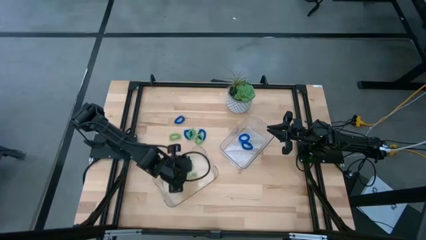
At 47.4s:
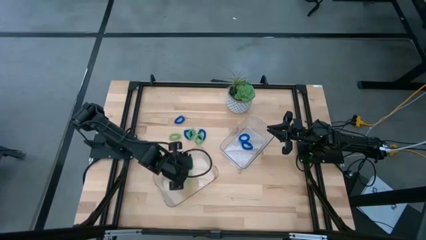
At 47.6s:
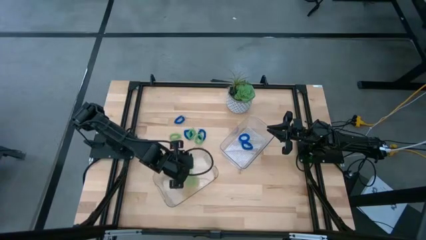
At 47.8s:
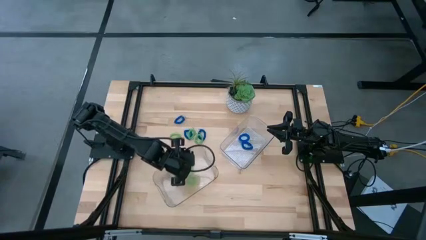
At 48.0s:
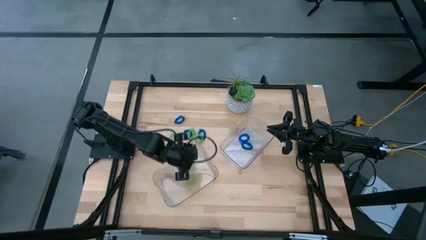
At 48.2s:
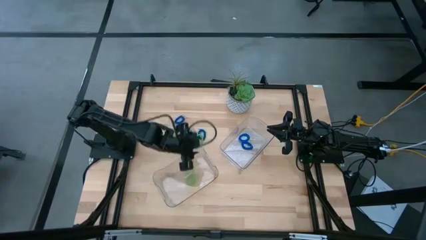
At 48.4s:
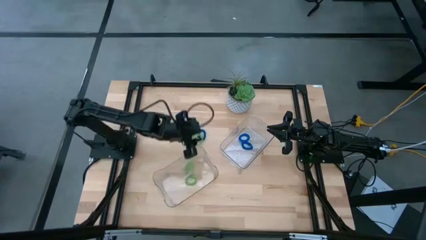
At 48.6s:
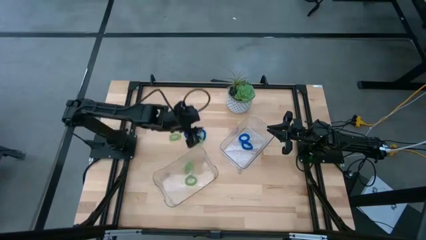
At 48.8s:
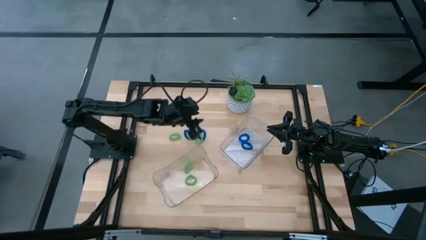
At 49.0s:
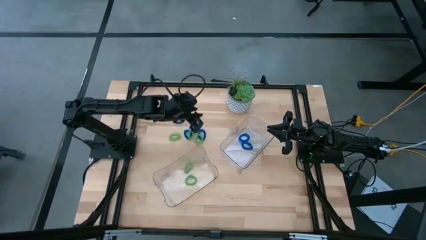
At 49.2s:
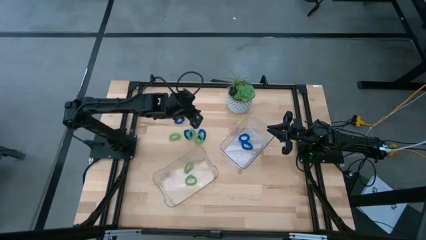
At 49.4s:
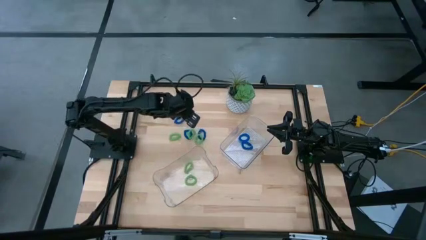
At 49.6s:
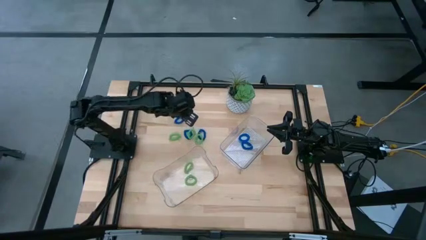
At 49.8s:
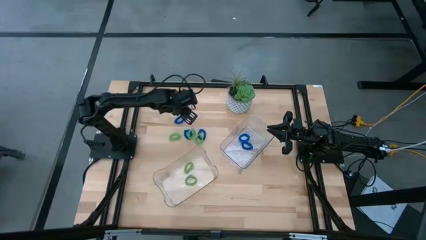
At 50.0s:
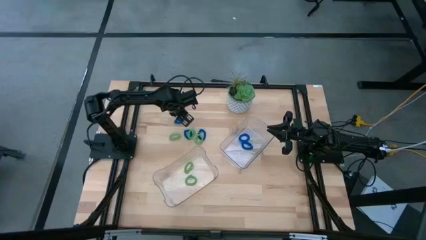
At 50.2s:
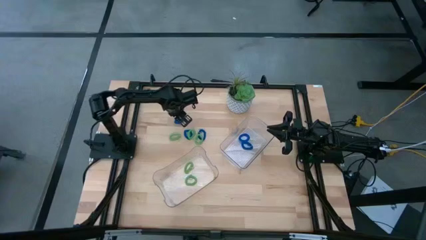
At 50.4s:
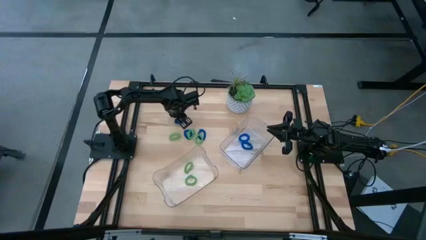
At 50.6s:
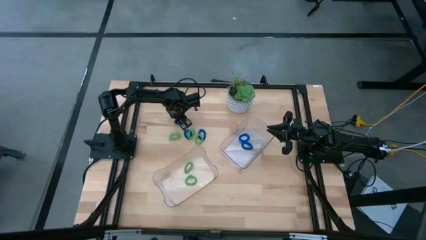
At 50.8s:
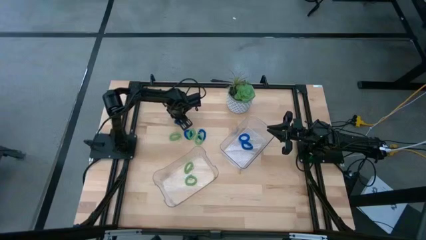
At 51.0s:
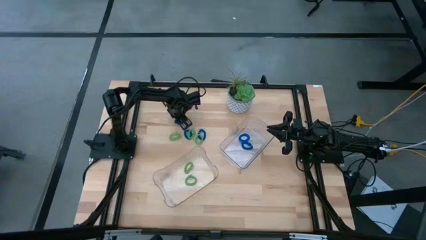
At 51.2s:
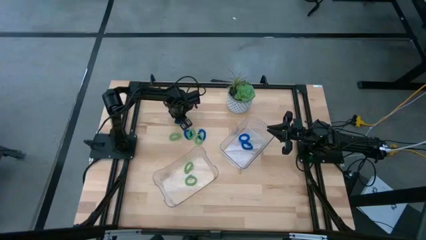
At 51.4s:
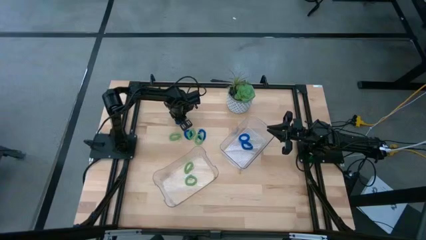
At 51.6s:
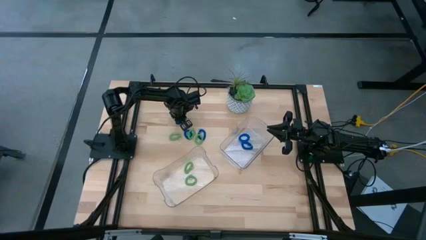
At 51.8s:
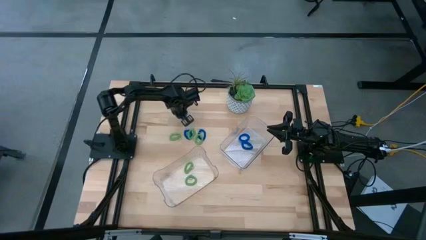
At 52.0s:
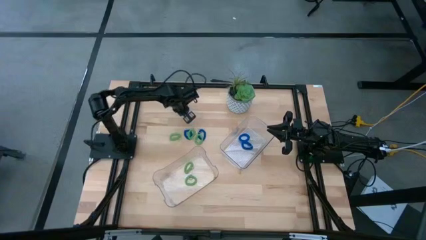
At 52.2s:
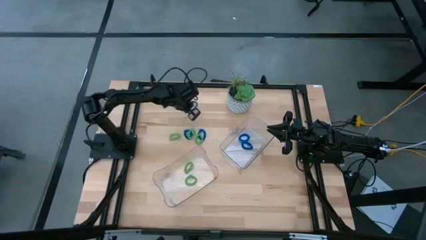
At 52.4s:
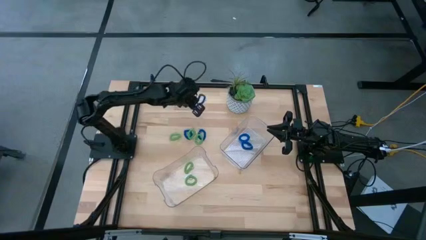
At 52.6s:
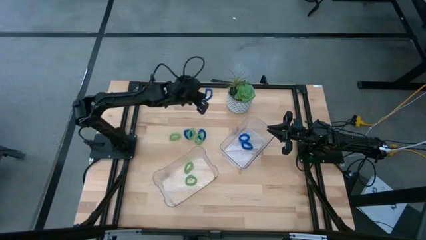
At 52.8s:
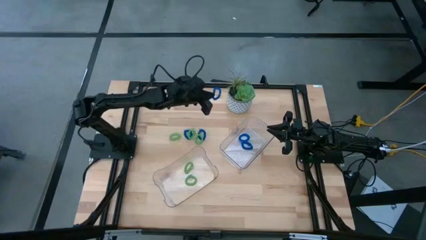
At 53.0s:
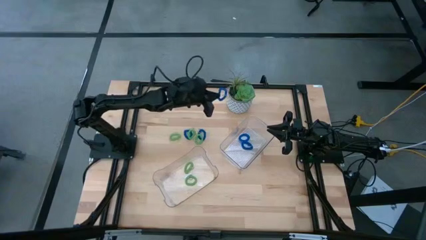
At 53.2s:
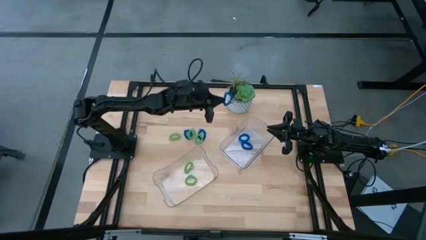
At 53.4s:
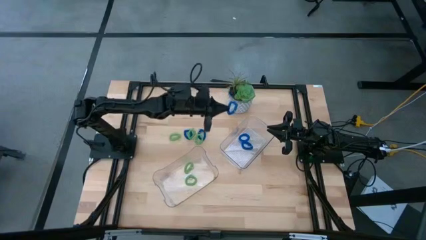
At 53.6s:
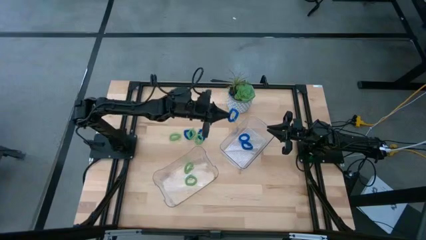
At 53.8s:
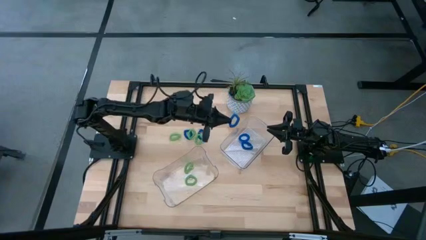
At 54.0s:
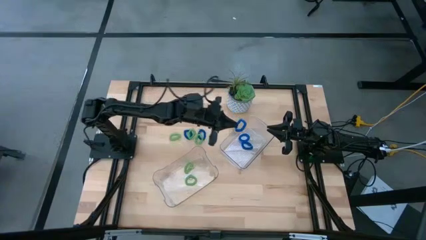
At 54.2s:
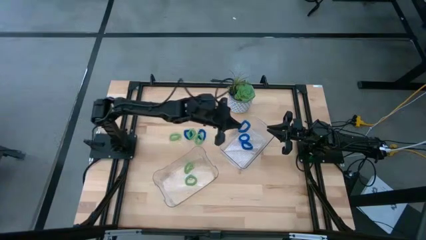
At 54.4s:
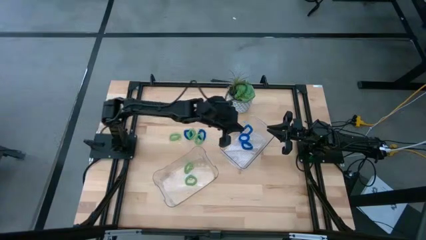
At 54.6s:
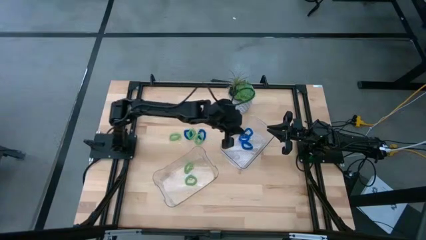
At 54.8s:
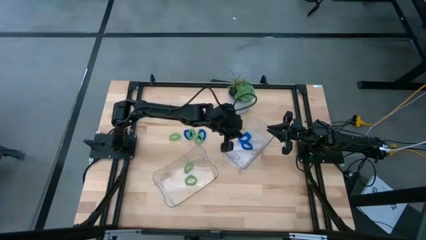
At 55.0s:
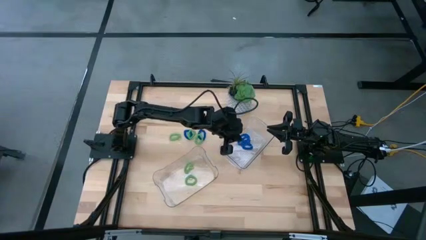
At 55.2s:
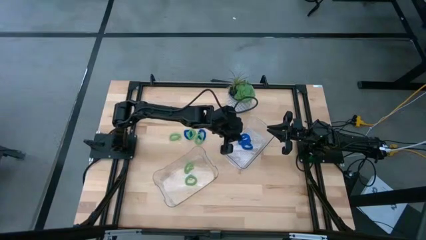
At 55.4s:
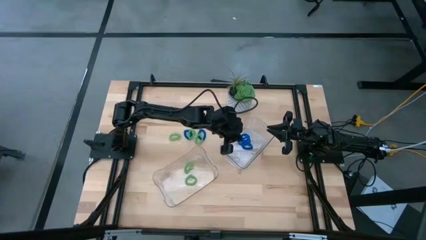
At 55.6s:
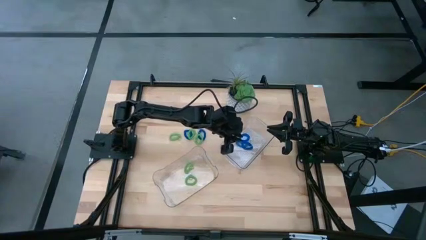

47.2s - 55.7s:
Task: Sort spring keychains
Put the blue spring keychain into the top transparent bin

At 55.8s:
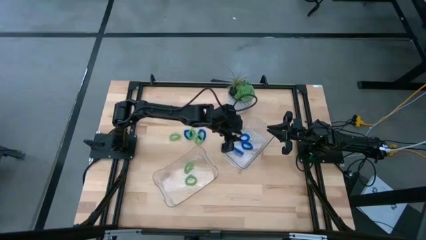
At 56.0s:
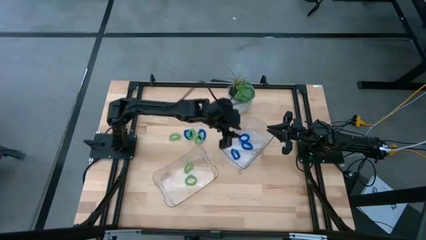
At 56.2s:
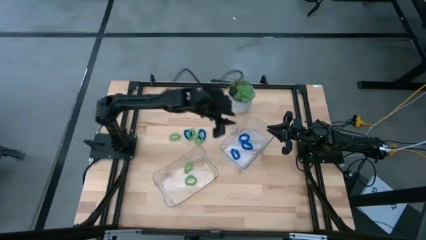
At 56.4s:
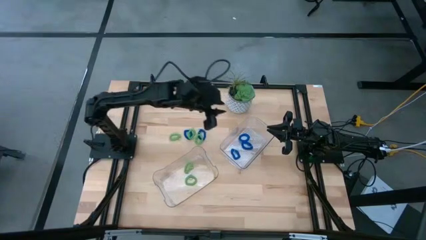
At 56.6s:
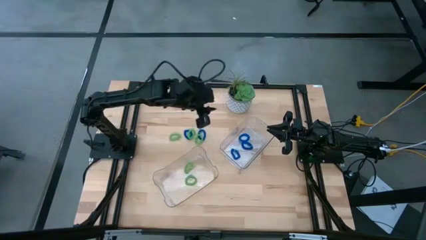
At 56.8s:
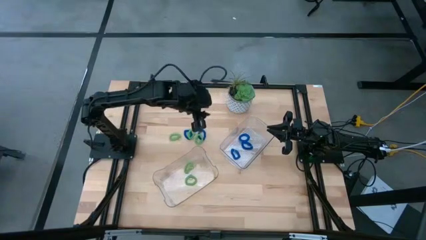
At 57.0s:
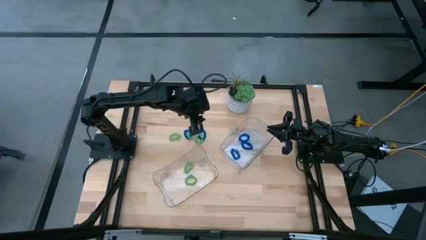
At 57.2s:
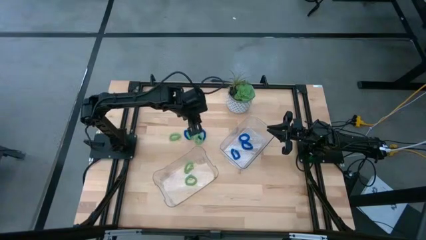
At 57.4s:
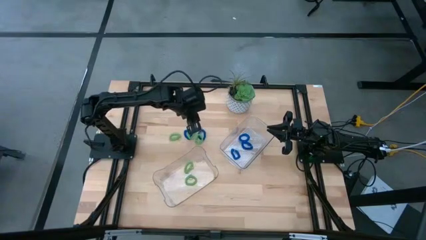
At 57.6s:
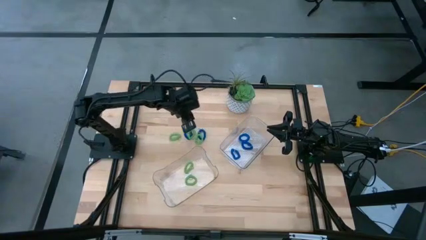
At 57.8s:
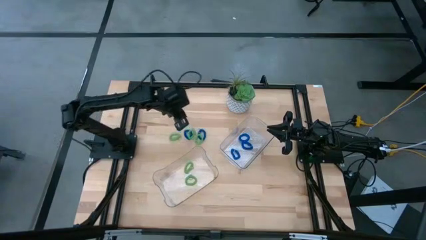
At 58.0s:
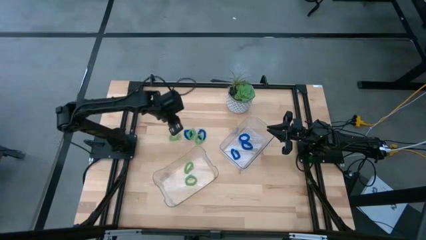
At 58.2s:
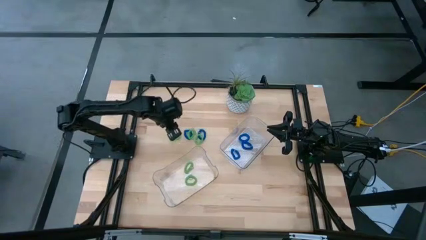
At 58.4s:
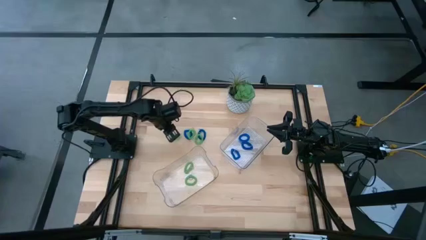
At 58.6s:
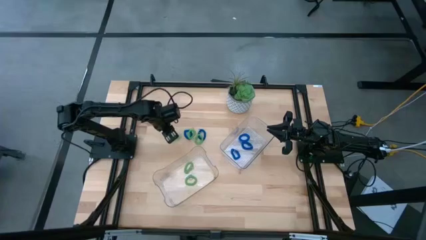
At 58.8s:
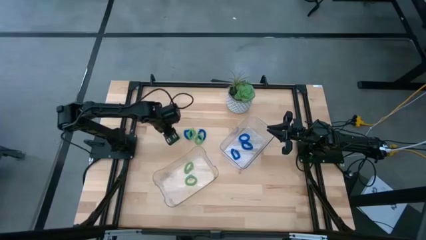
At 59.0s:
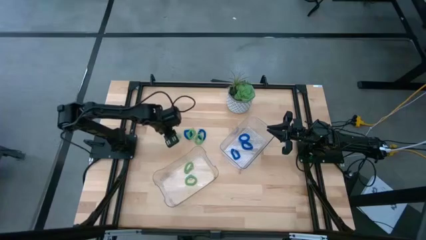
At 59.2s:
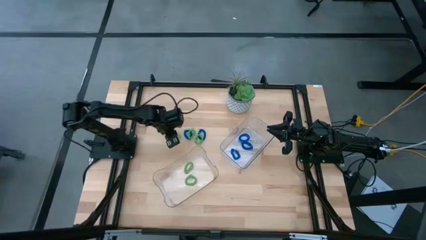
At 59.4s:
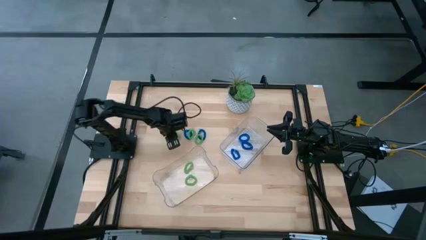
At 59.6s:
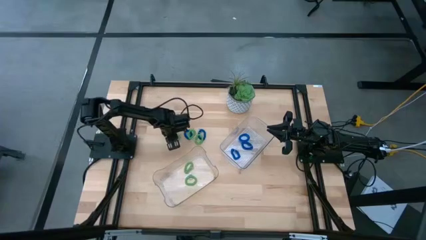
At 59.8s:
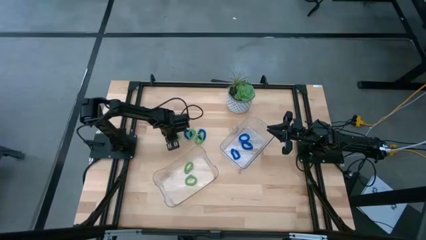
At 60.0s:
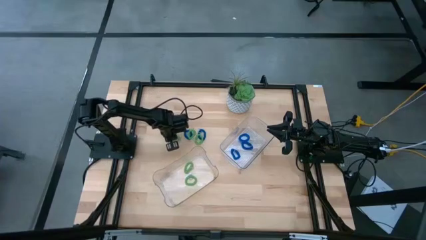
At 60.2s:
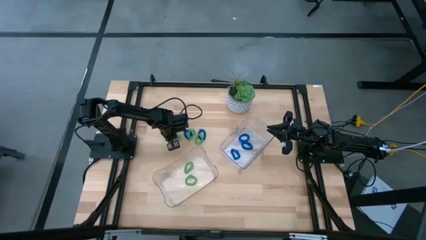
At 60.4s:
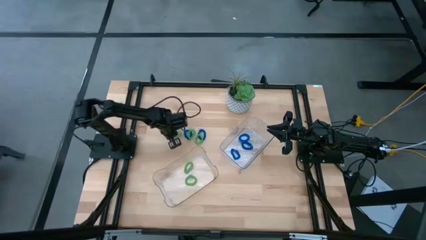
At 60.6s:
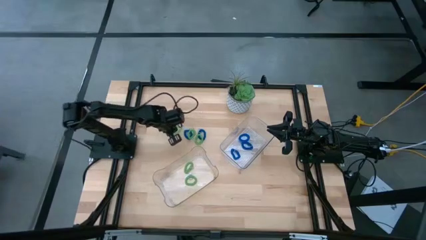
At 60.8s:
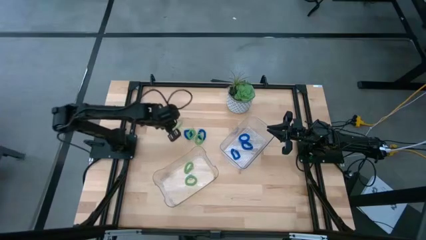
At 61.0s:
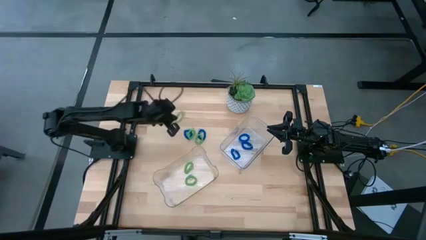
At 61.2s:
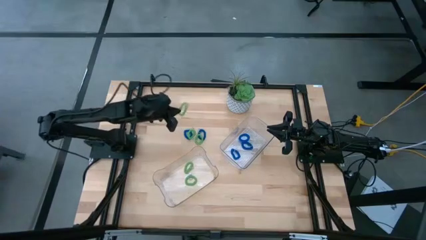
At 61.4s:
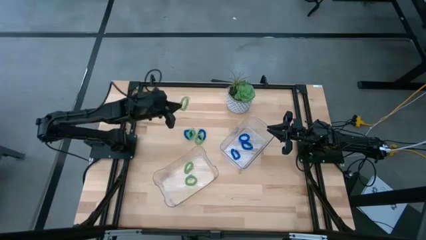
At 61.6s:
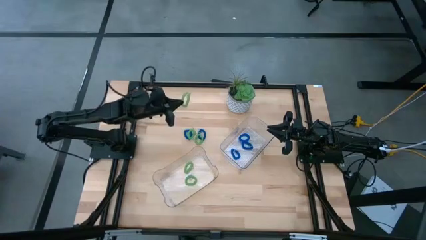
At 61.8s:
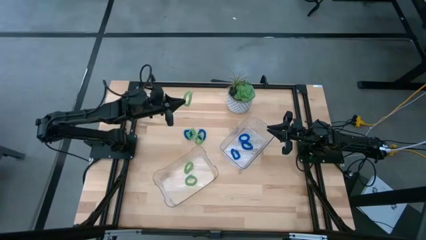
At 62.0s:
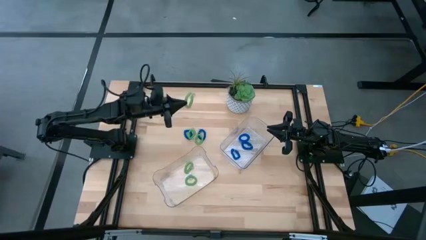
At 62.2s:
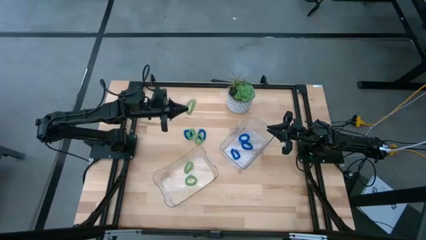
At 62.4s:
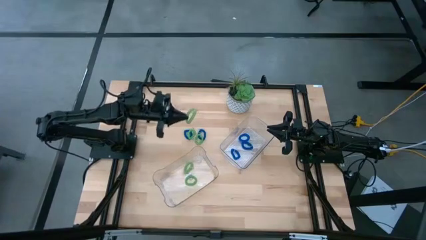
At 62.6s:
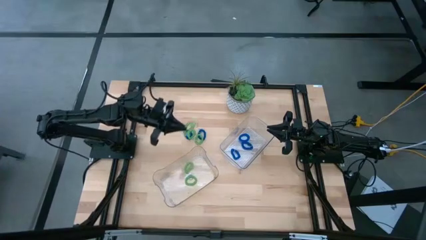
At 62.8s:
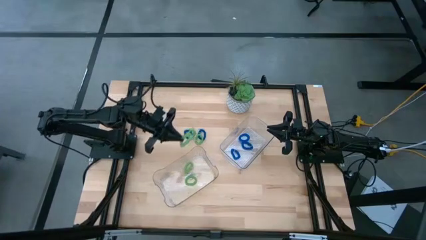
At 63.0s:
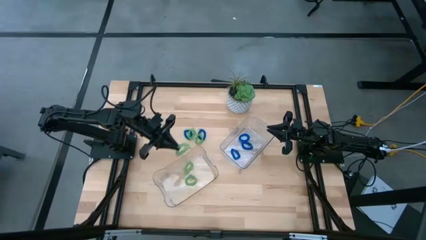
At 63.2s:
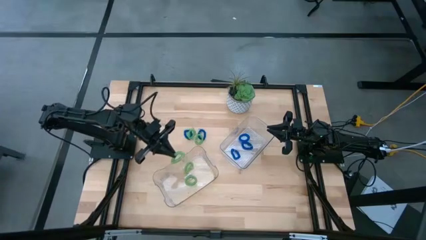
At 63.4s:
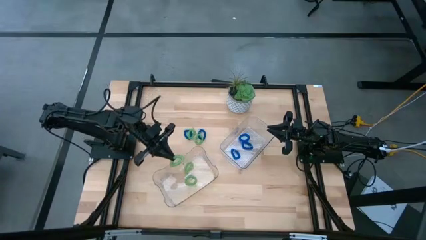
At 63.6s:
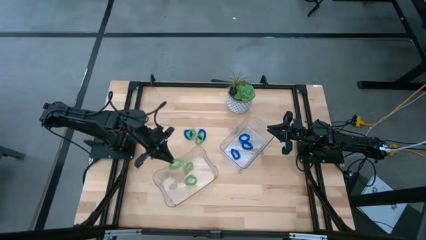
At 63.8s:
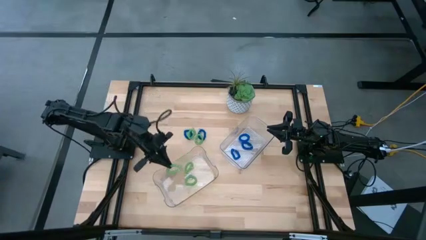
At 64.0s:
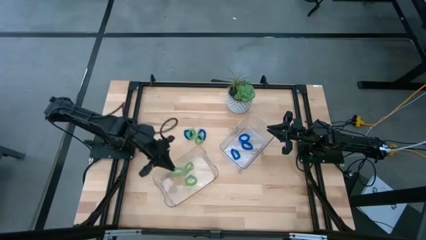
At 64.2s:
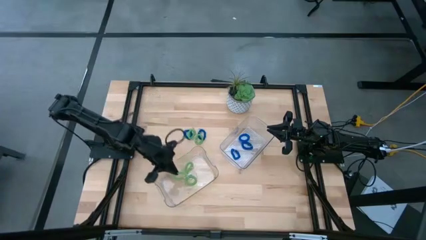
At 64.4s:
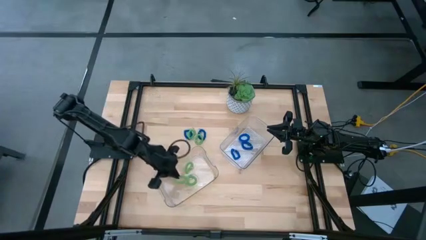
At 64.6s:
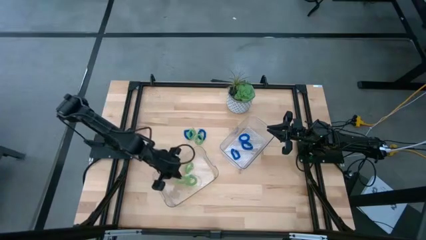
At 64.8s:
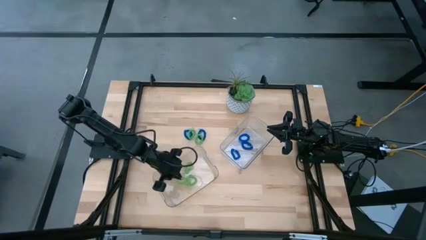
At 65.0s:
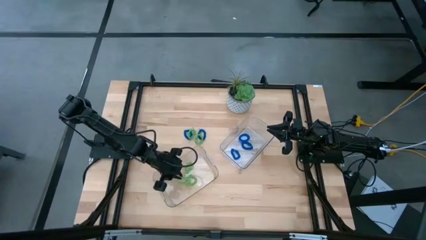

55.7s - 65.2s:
Put the green spring keychain into the bottom transparent bin
